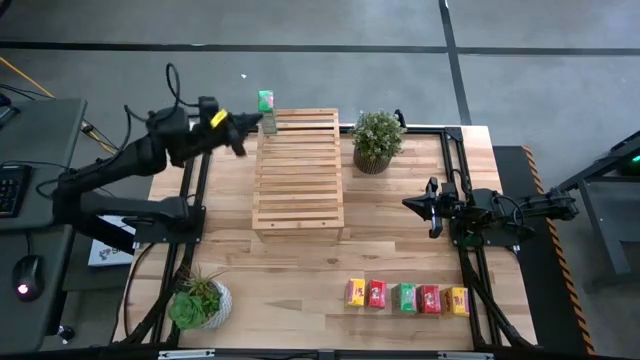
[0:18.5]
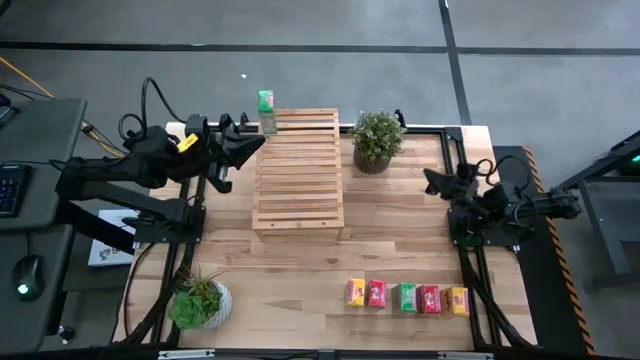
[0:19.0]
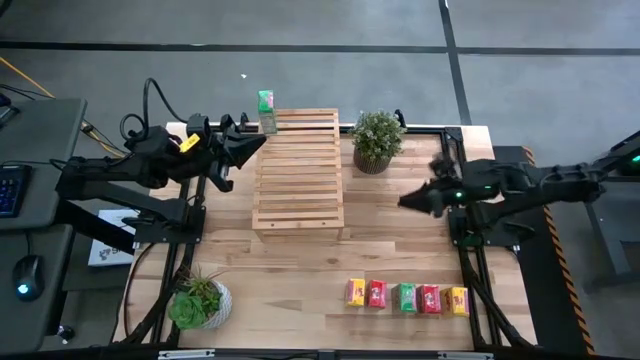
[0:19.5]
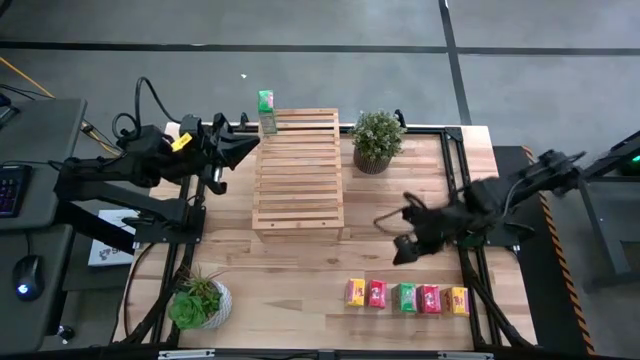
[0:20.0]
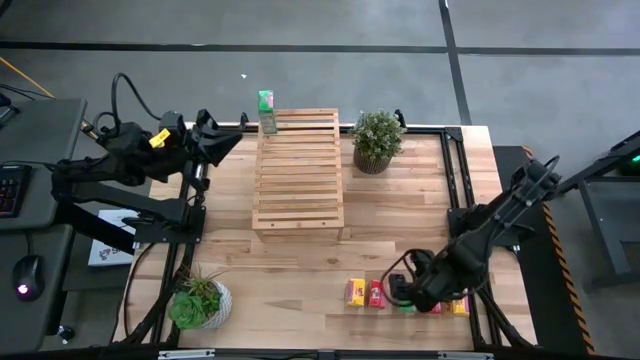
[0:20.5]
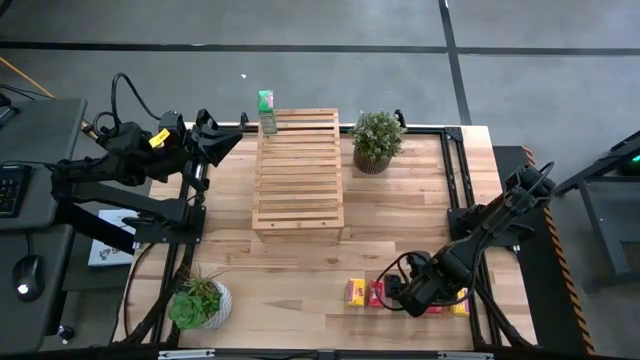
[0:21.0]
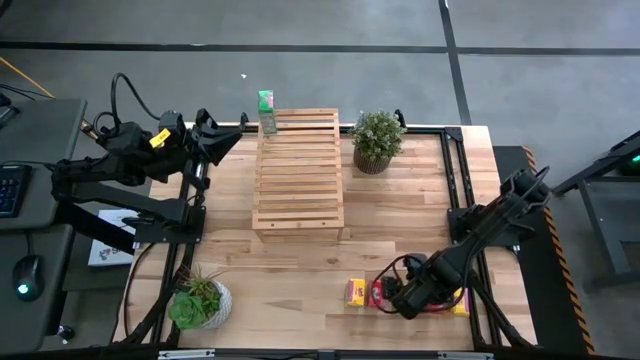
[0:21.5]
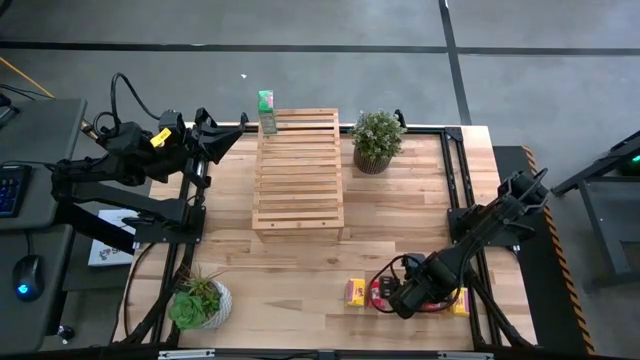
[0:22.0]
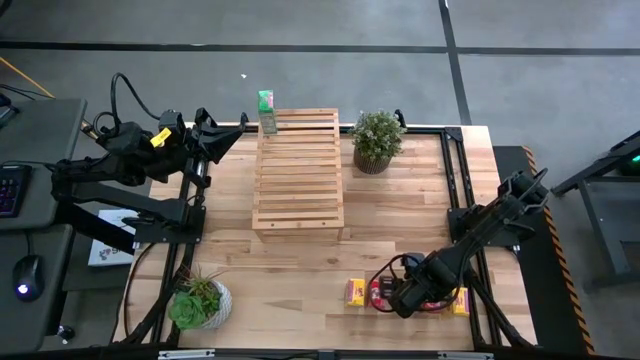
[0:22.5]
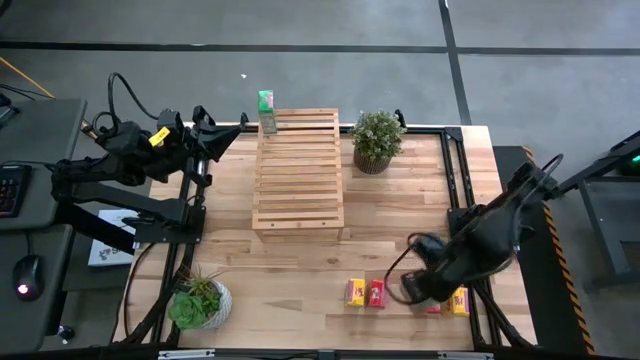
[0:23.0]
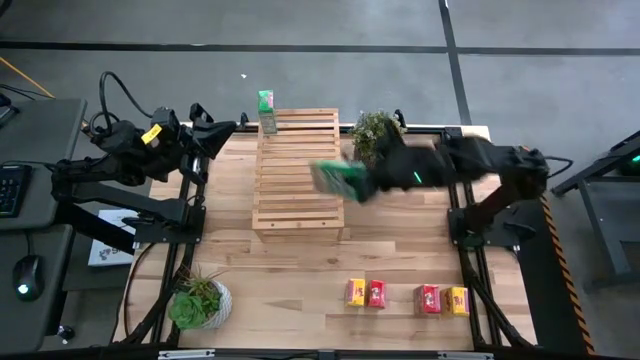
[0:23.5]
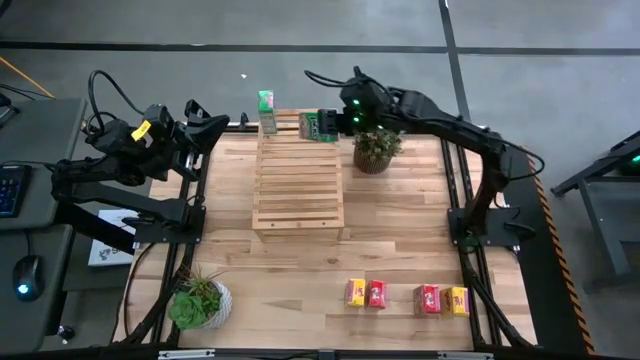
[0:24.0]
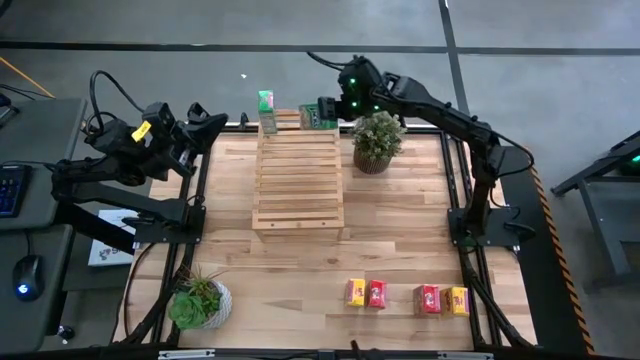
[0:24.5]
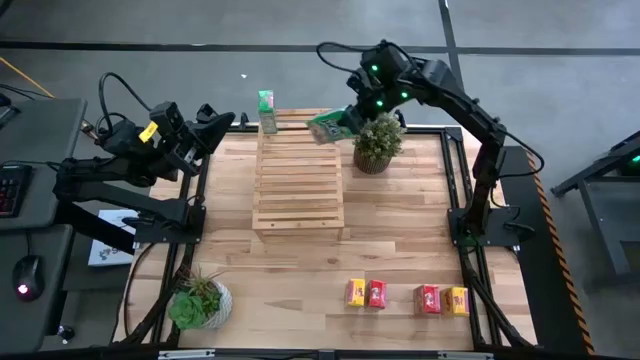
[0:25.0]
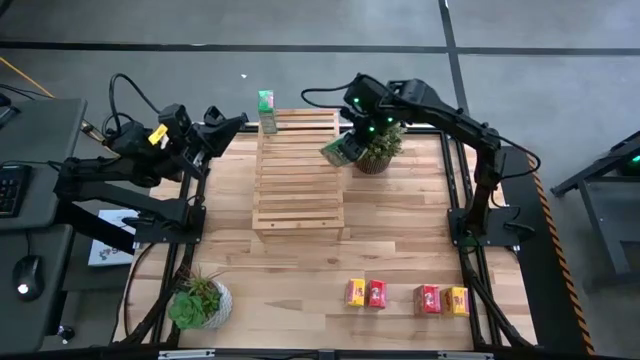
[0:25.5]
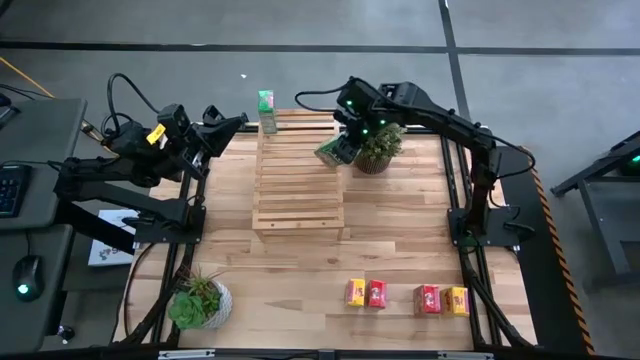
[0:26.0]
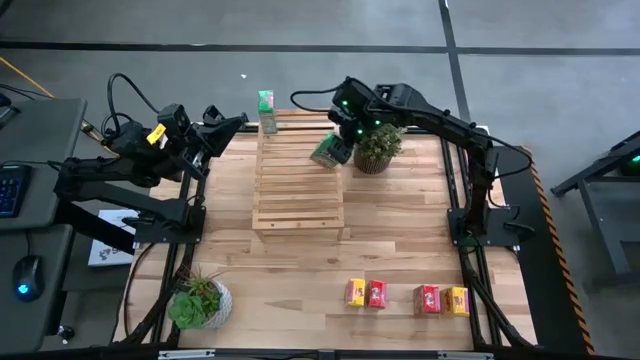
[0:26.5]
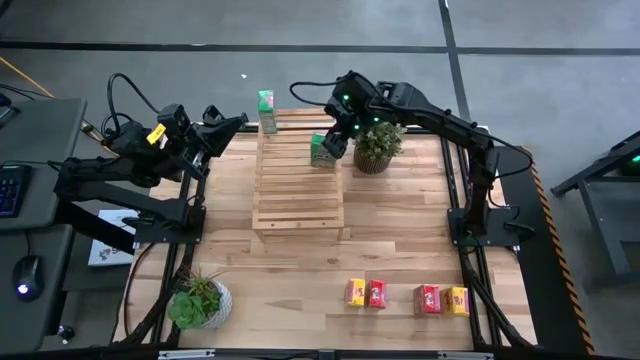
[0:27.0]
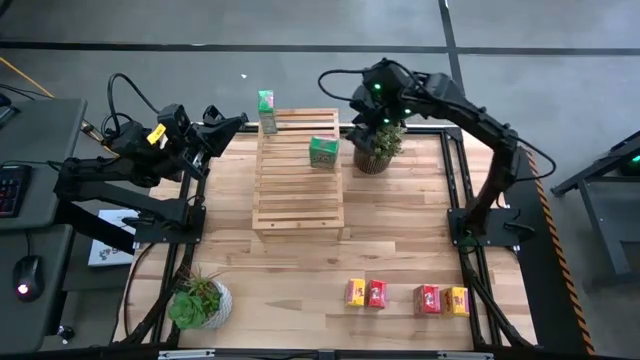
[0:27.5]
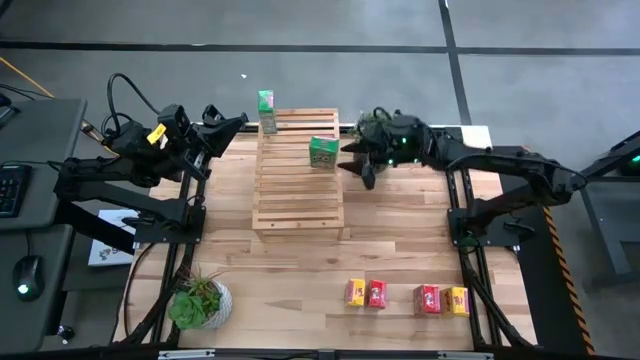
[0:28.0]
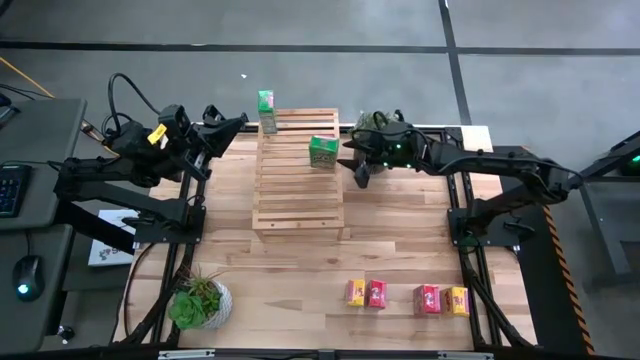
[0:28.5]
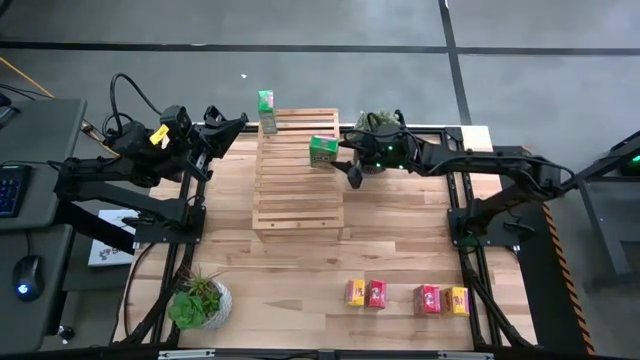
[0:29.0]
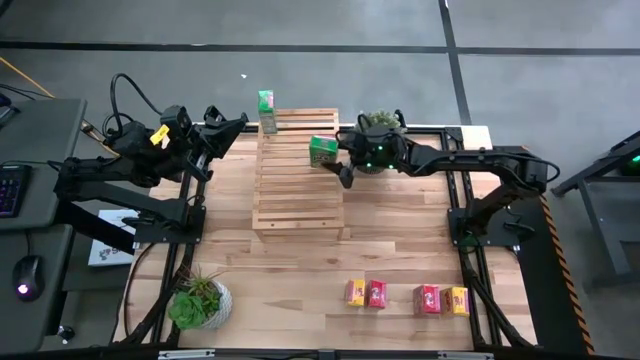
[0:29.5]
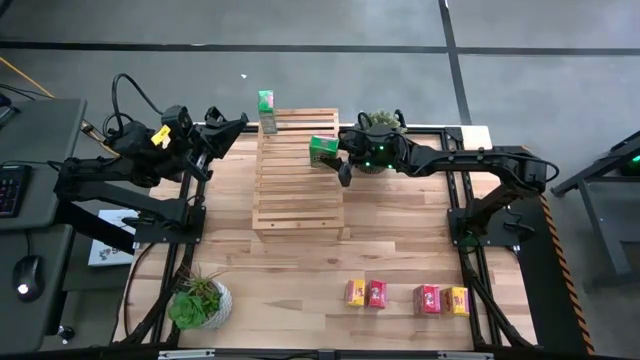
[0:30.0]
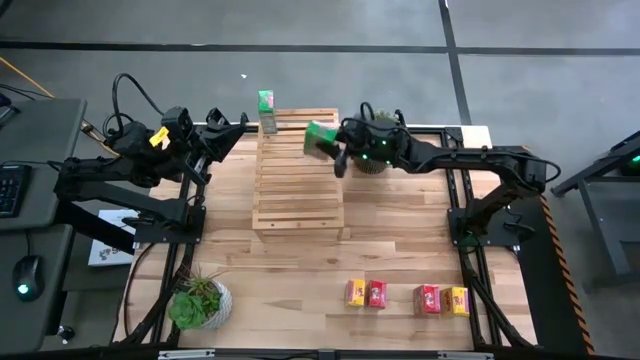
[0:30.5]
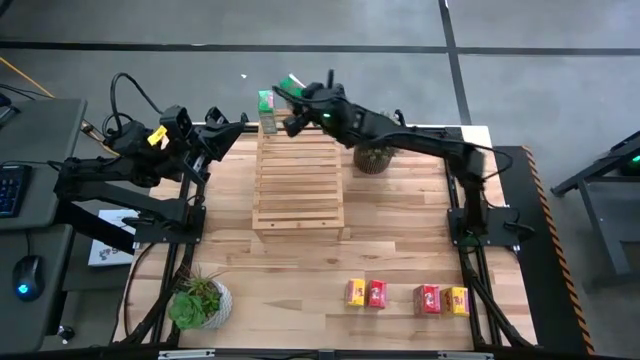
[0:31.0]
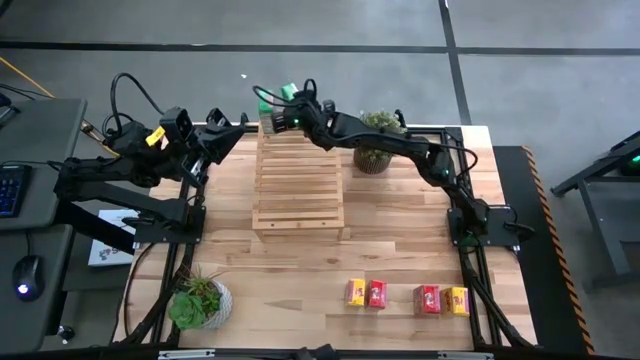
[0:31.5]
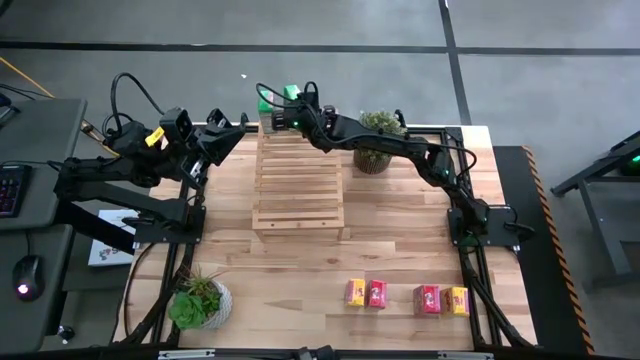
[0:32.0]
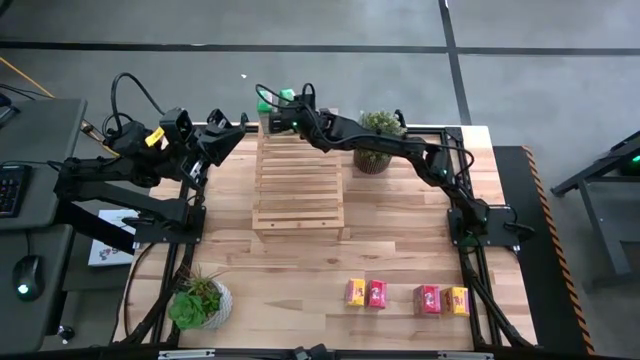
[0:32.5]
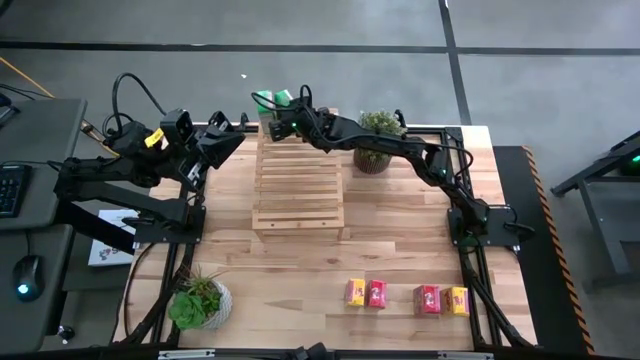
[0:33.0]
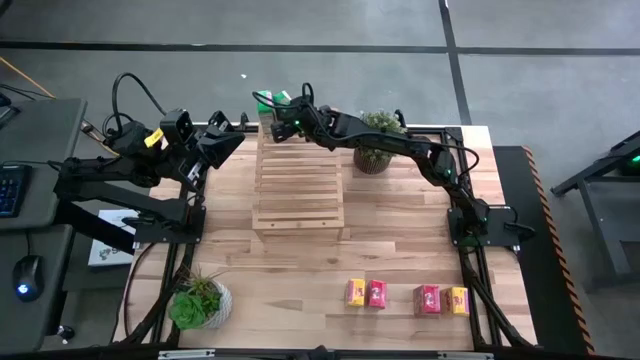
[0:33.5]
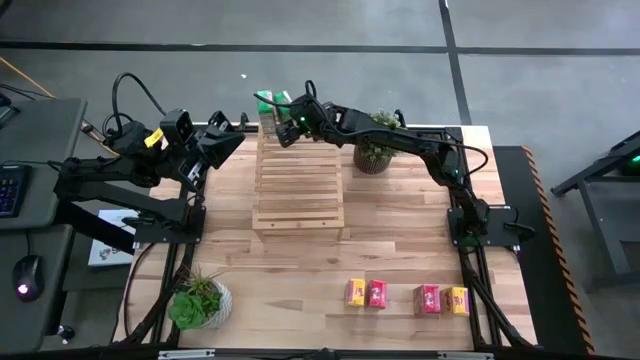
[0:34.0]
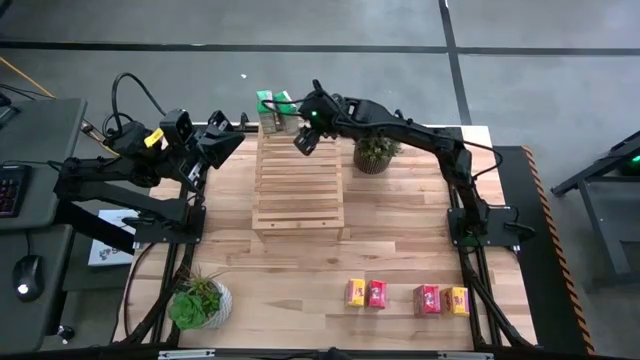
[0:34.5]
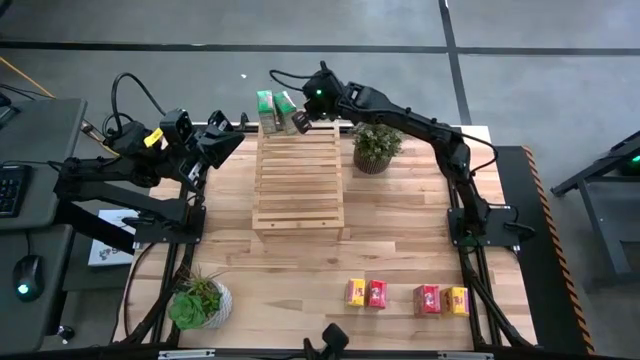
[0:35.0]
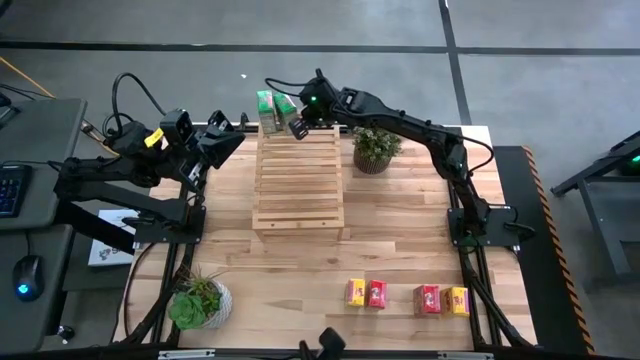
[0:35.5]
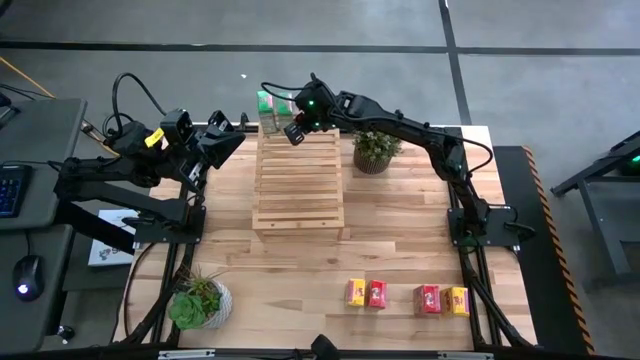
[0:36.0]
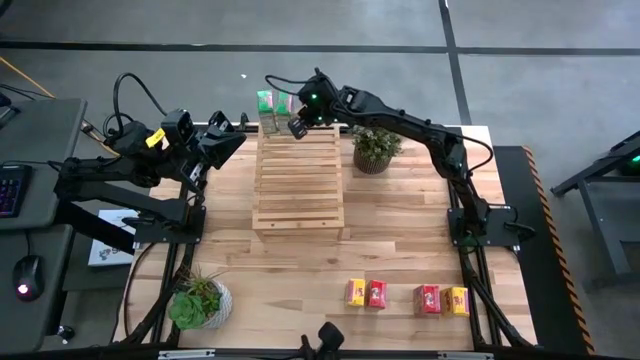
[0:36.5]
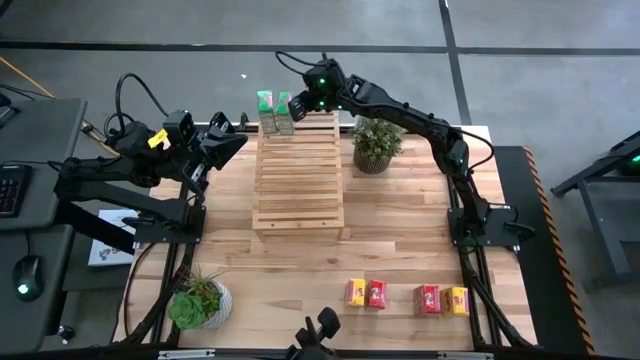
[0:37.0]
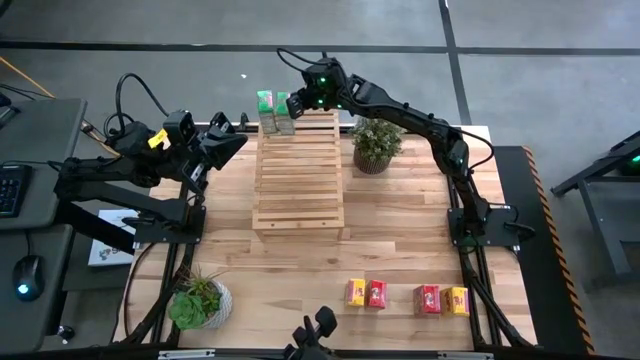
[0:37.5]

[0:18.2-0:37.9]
Task: Stack cereal on shelf
Put the green cereal box aligned with the other green cereal box on the shelf

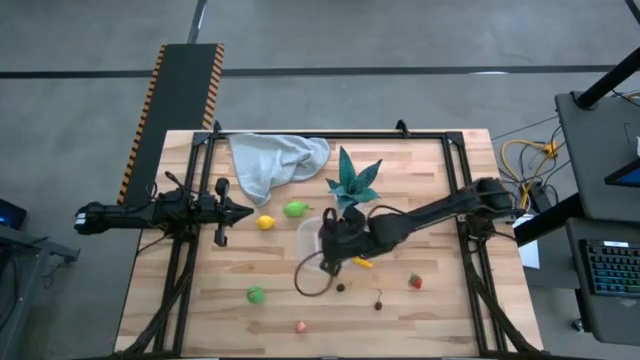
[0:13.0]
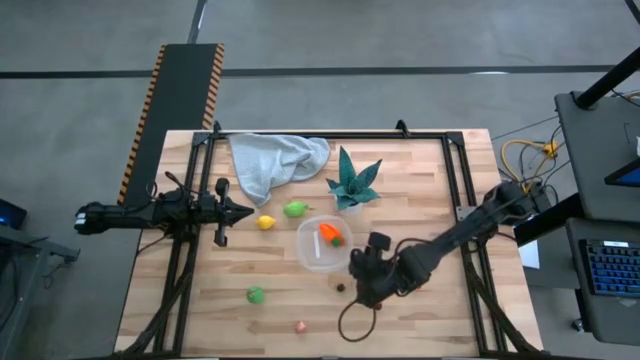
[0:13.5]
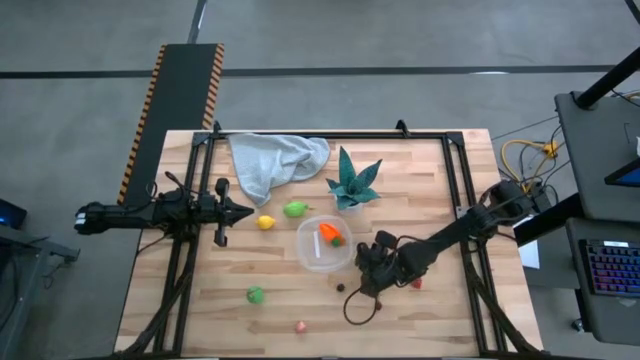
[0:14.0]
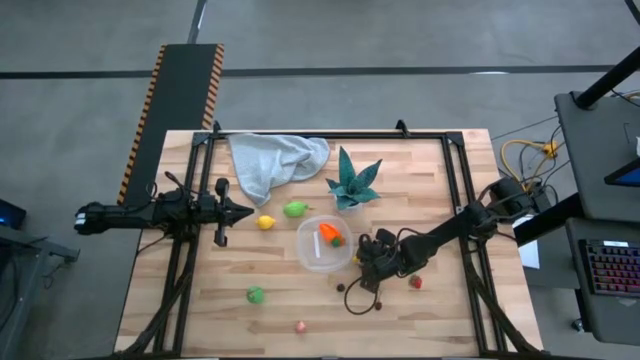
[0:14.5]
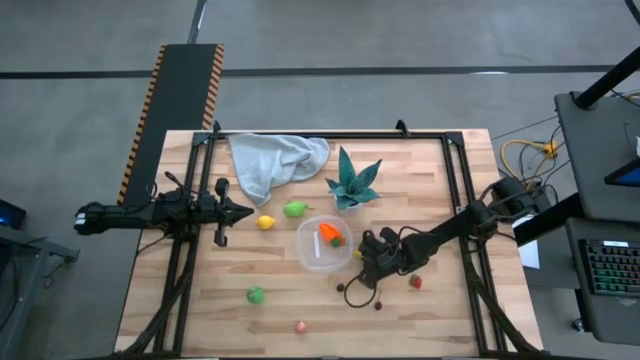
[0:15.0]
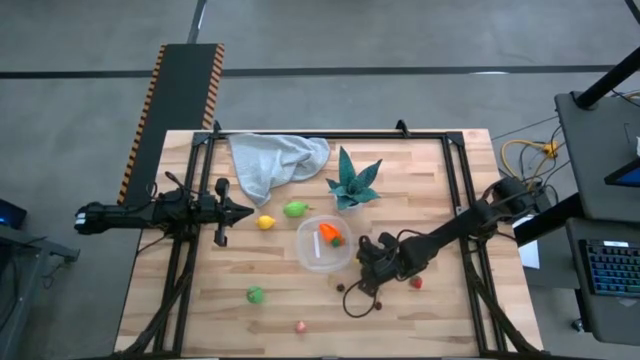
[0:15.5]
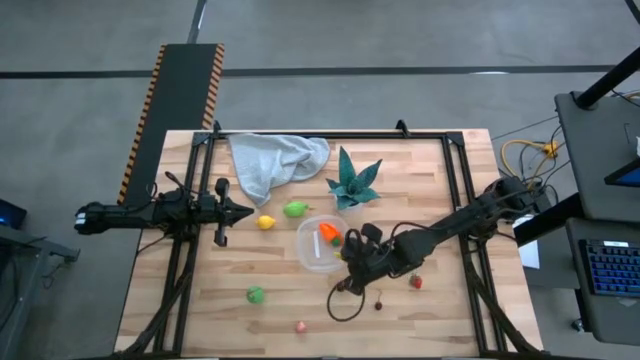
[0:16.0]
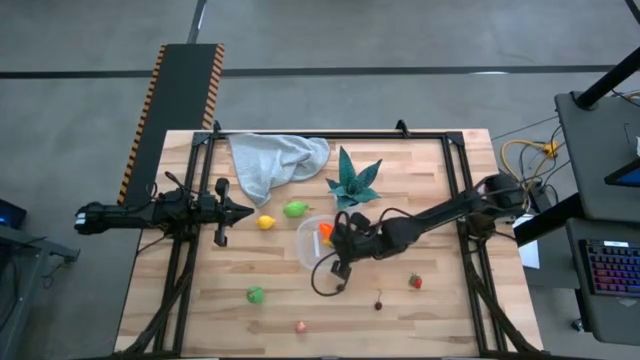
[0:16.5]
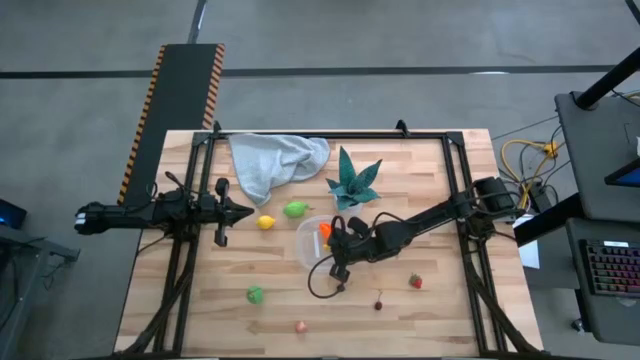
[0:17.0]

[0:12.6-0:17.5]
Task: Pick and placing Produce into tupperware
Put the corn into the transparent bin
